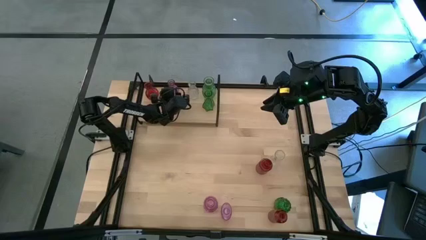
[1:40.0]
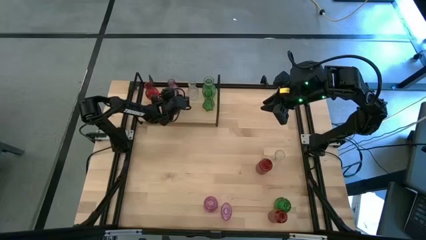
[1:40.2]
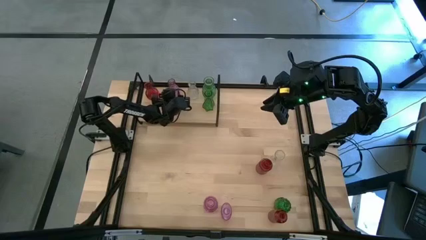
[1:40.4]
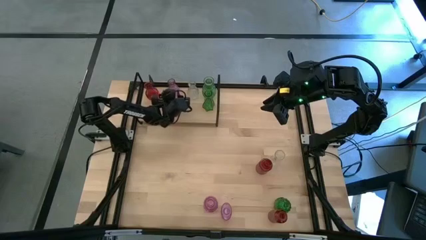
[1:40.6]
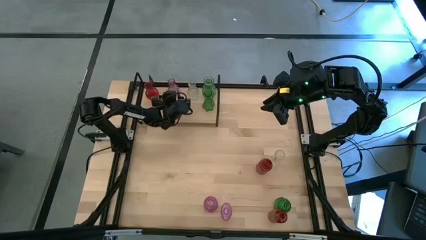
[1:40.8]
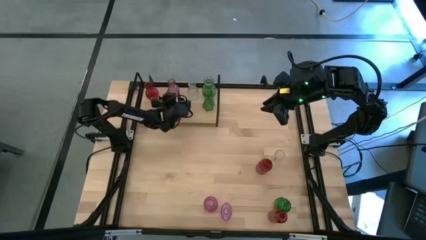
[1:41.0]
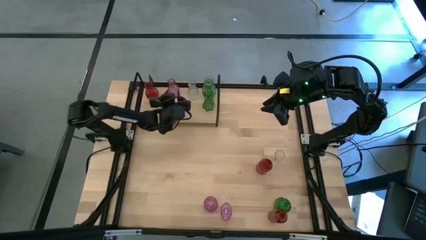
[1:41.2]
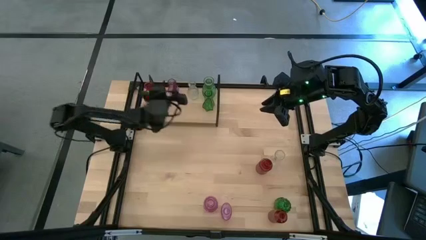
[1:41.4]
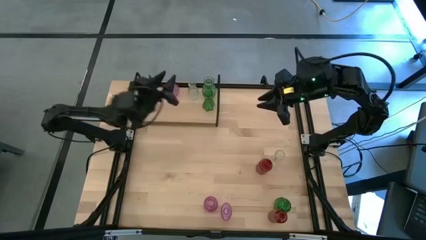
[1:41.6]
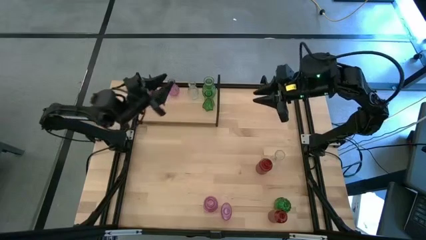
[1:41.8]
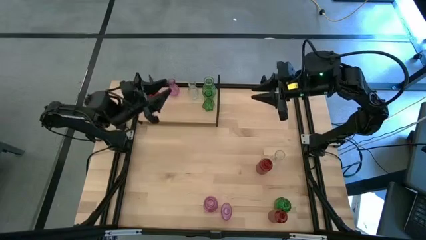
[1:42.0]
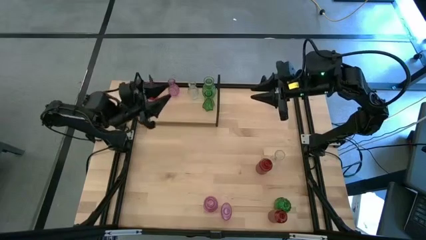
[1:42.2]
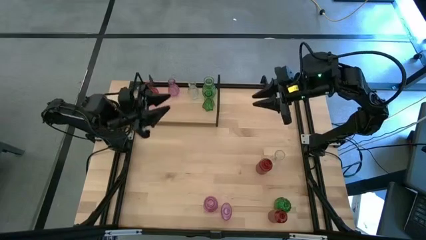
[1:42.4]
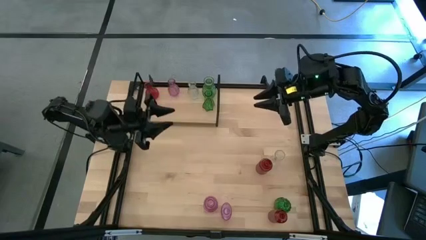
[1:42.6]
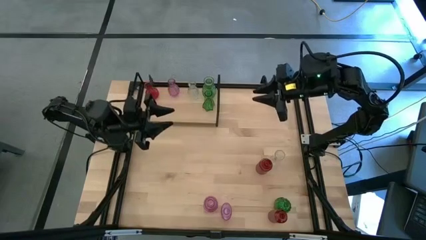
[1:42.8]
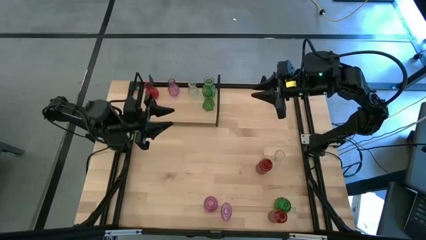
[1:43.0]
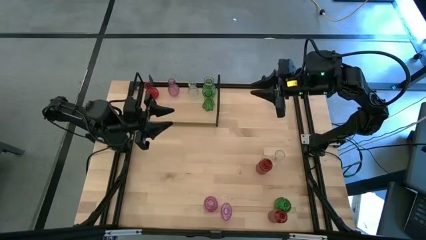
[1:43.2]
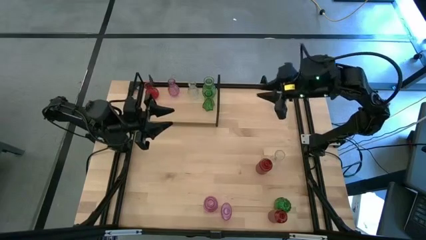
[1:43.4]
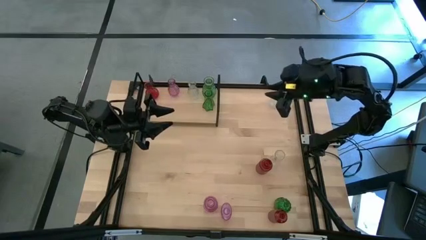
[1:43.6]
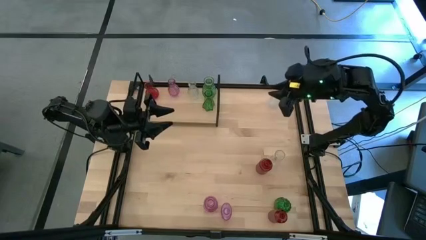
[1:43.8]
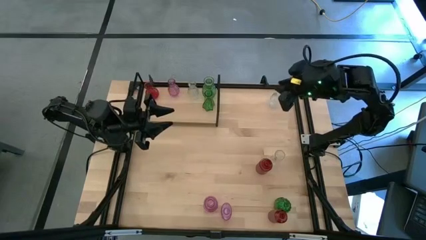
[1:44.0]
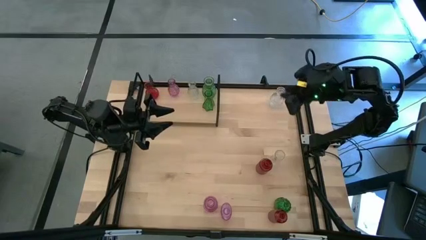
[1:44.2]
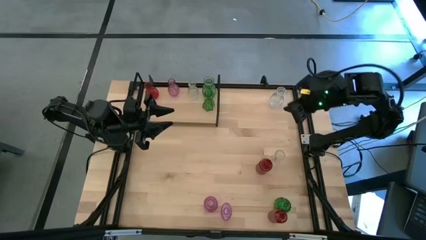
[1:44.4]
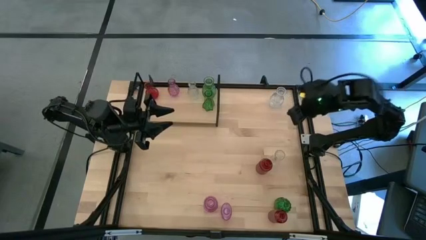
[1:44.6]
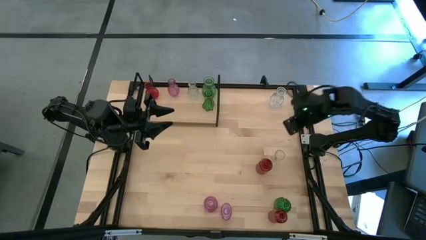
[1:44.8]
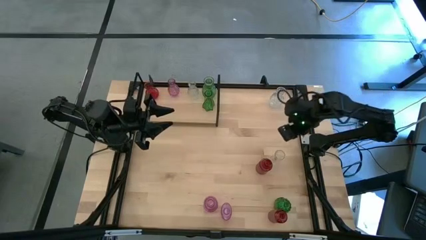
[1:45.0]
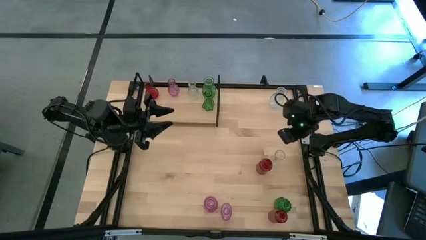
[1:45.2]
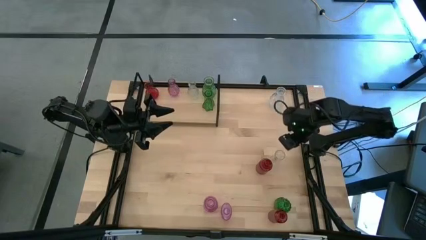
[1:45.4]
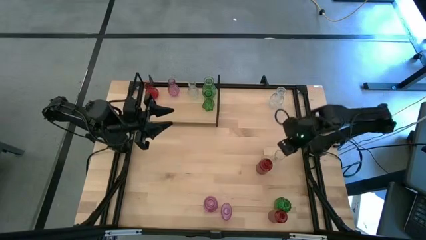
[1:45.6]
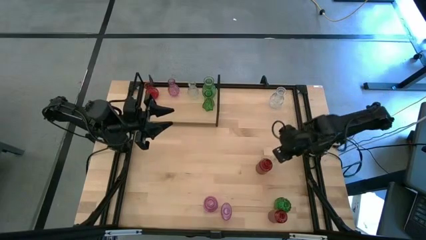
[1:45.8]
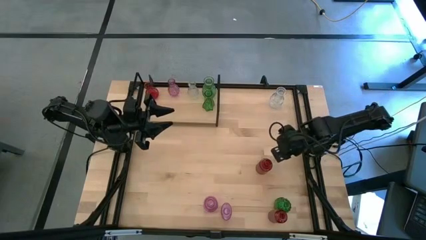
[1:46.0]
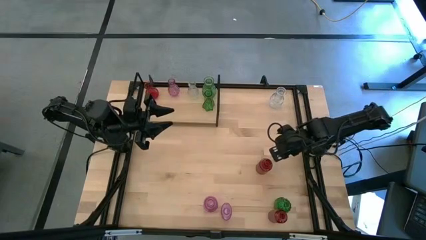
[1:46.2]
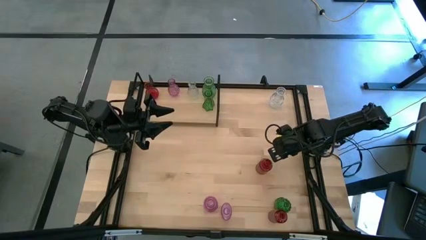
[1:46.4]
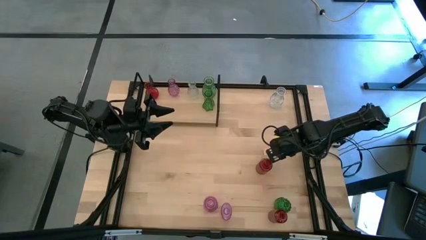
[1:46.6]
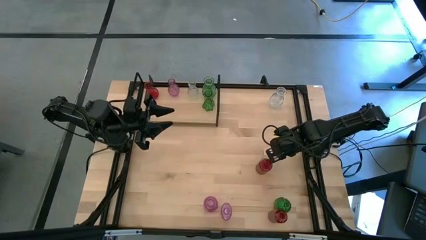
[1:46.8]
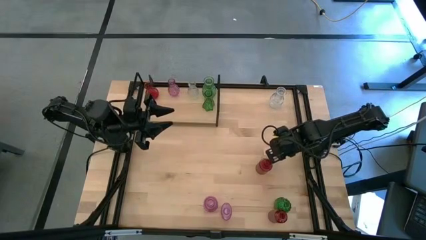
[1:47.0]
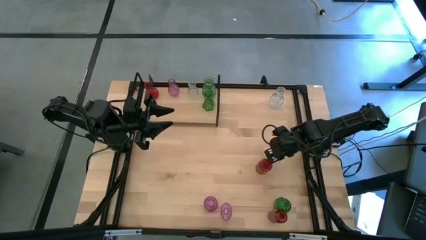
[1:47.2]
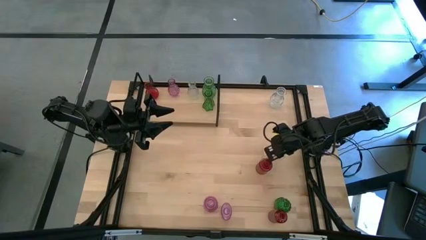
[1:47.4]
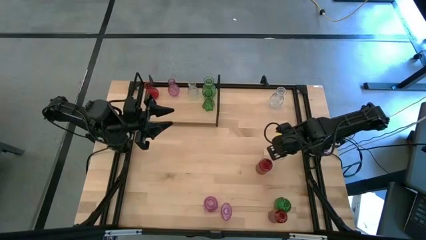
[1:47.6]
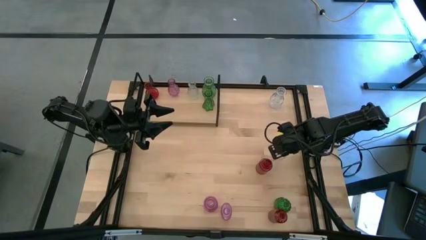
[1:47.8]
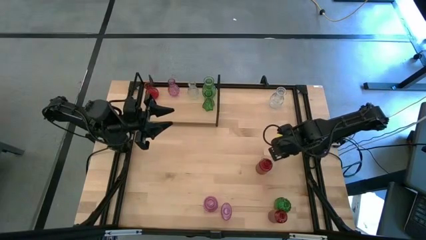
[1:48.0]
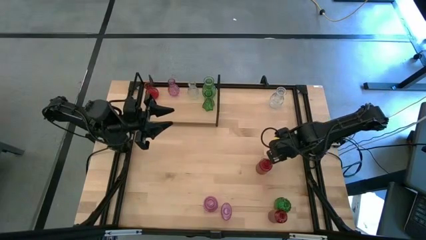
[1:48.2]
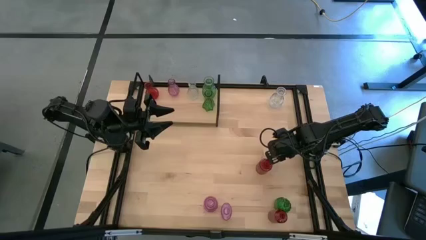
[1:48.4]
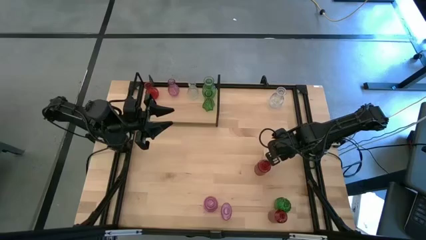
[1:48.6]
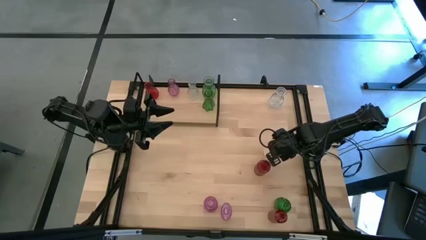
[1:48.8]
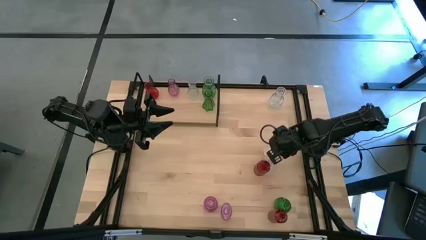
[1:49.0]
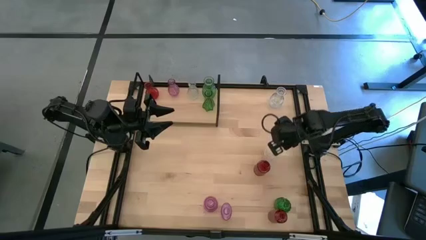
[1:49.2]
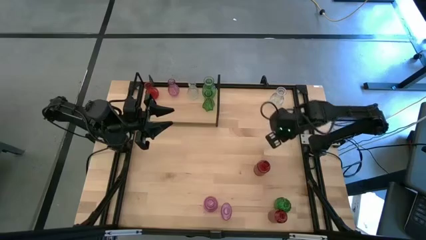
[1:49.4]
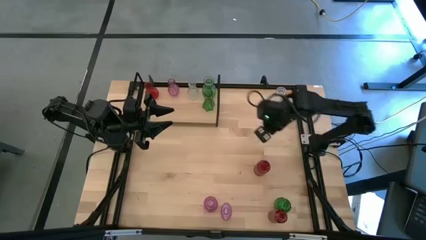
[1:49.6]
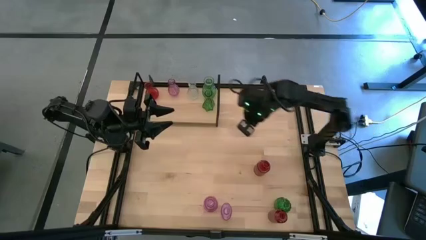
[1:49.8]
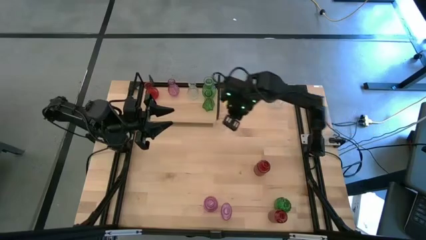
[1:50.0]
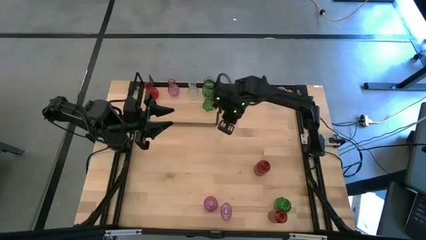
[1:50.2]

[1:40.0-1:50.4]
Task: sort vases onto shelf
Put the bottom transparent vase on the shelf aligned with the other transparent vase

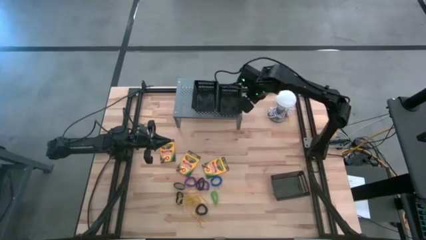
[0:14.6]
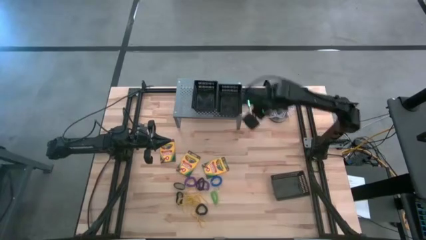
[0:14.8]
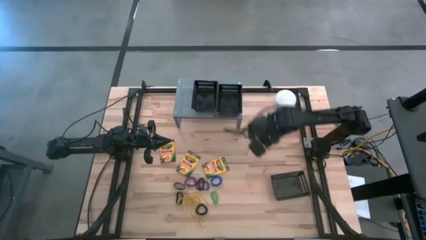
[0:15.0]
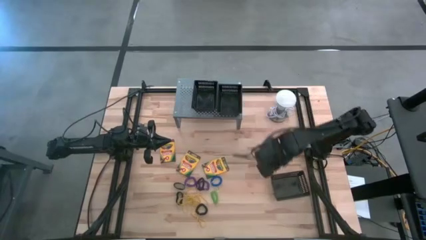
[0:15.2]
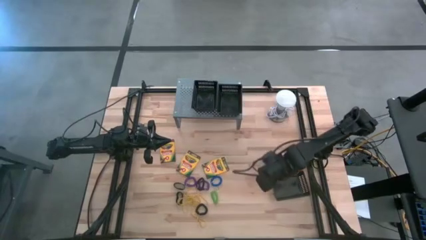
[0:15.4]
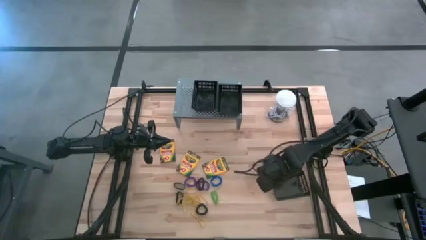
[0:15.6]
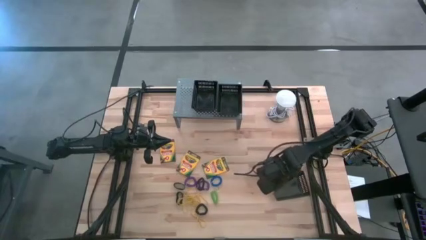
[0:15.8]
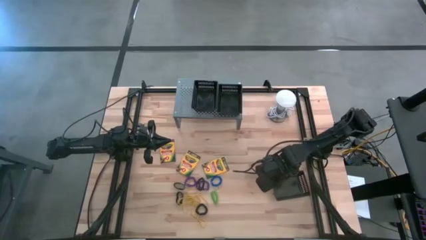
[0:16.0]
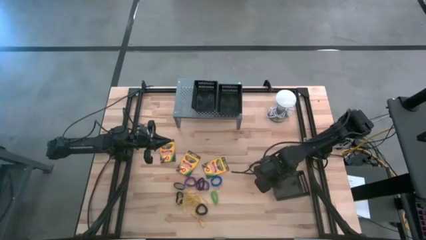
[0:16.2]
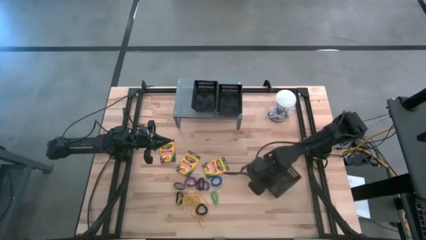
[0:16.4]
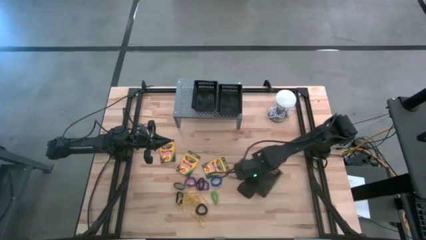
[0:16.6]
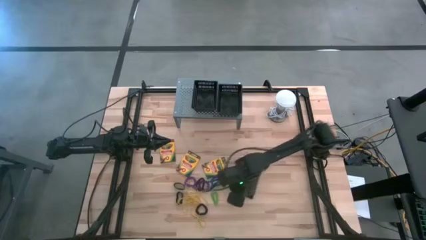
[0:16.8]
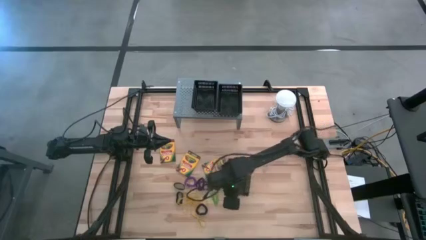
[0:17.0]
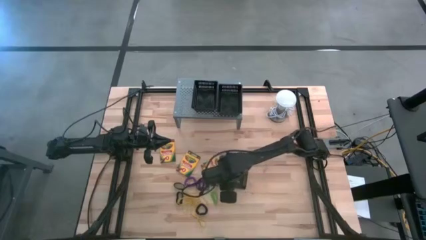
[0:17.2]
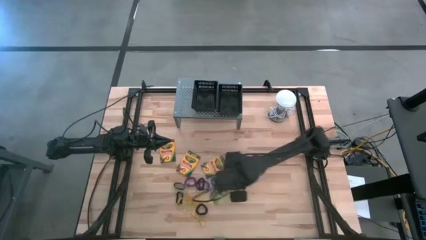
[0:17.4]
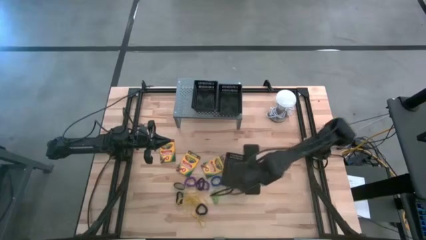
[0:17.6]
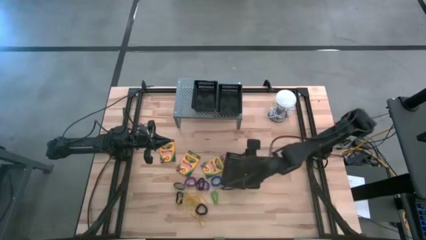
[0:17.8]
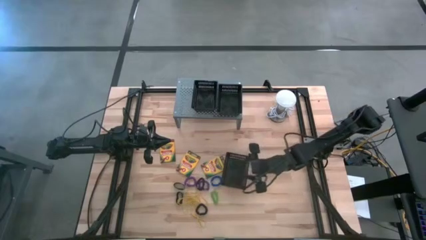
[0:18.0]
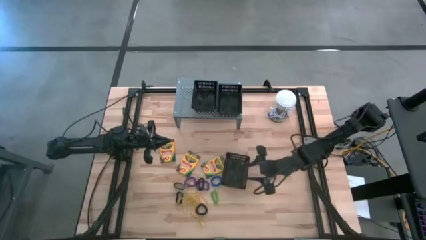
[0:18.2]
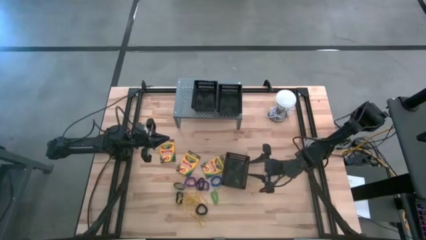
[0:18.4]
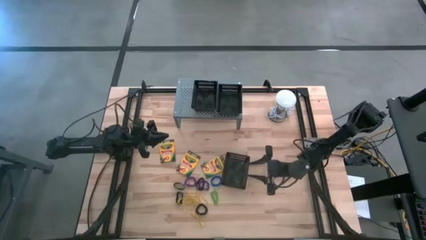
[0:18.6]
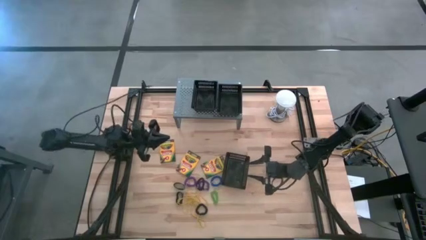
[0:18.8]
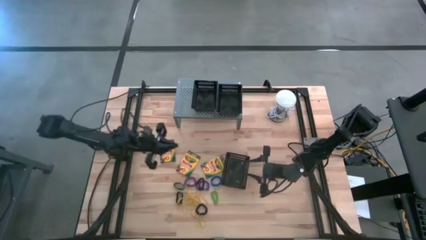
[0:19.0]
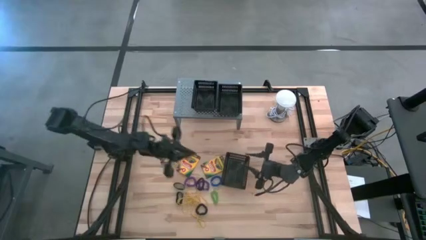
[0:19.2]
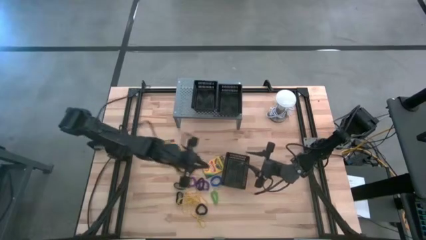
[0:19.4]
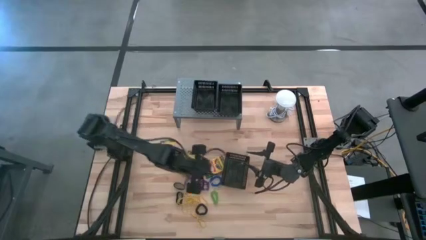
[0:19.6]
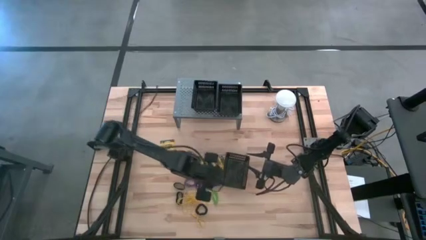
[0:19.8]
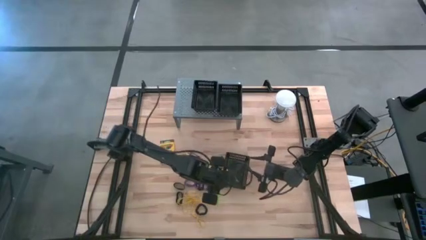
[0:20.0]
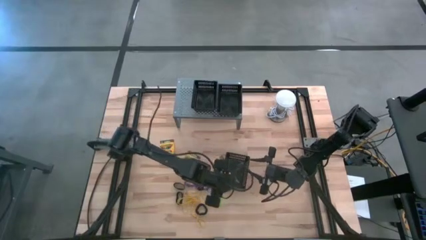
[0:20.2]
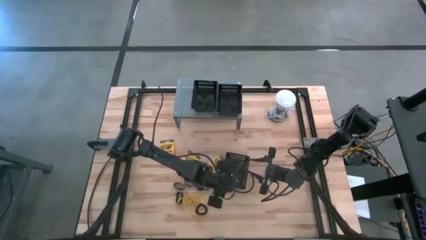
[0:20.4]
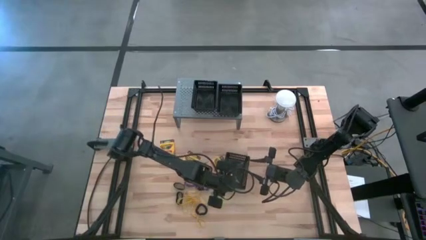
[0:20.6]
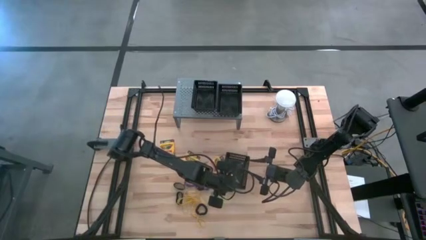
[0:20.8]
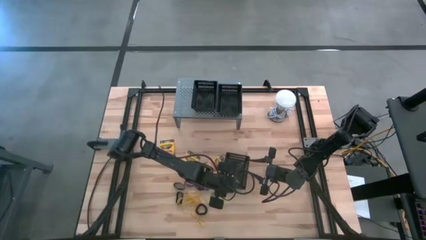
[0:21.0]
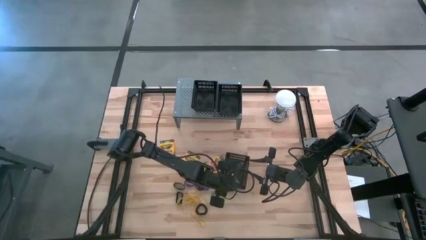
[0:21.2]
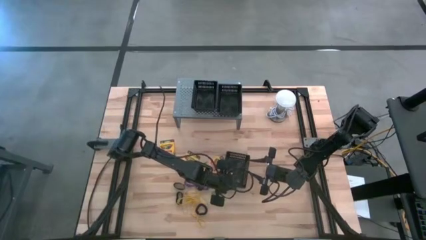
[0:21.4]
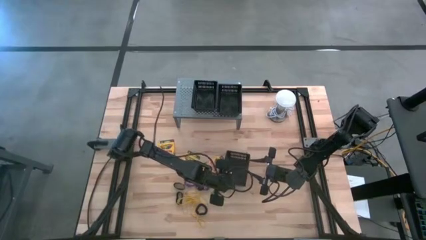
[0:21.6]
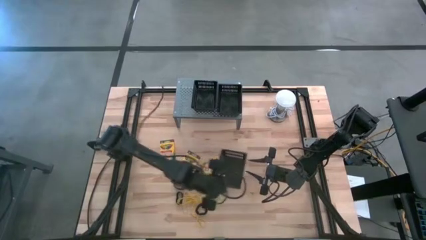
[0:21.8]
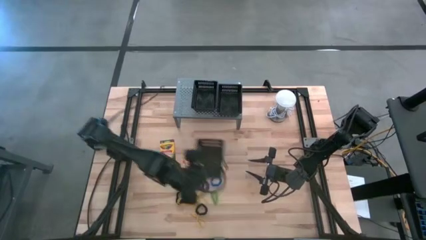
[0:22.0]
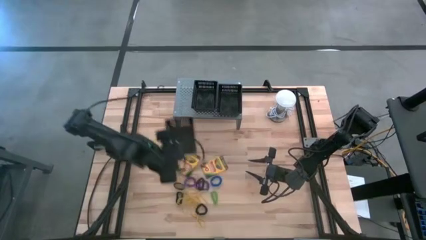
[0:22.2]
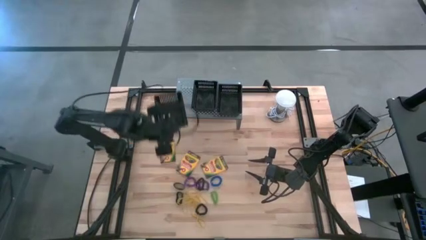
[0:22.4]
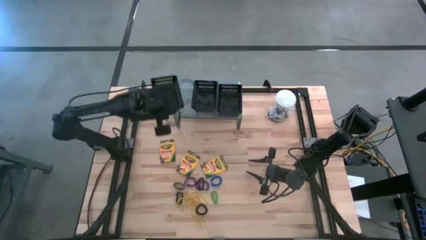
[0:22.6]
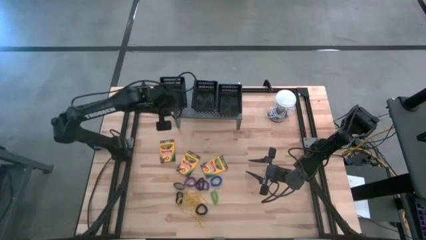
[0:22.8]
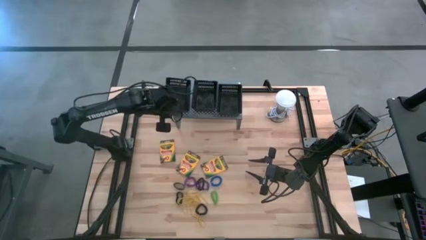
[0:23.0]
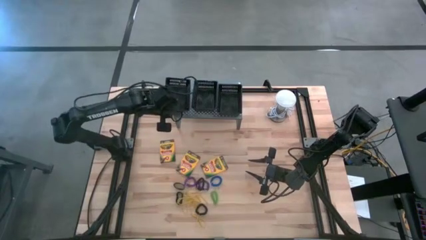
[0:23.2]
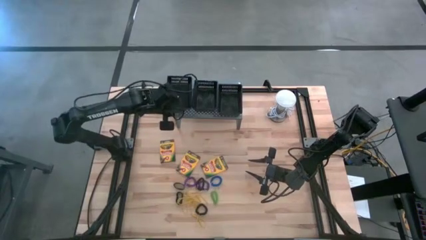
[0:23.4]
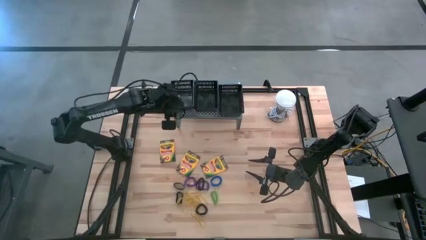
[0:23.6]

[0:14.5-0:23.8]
Task: Pick & Place Office Desk Supplies
Put the black bin on the shelf
